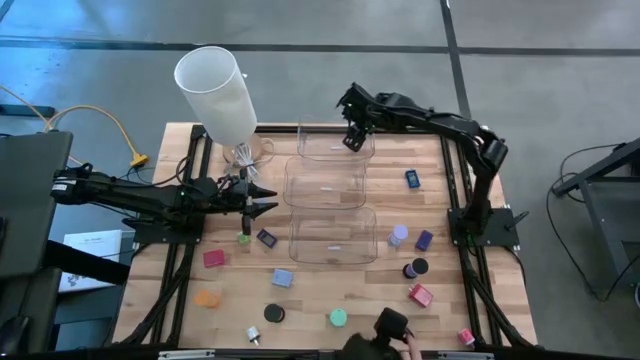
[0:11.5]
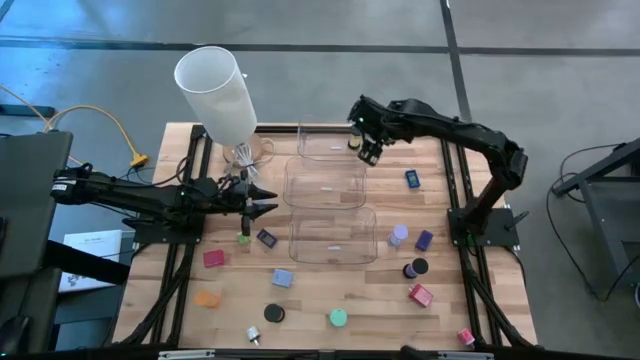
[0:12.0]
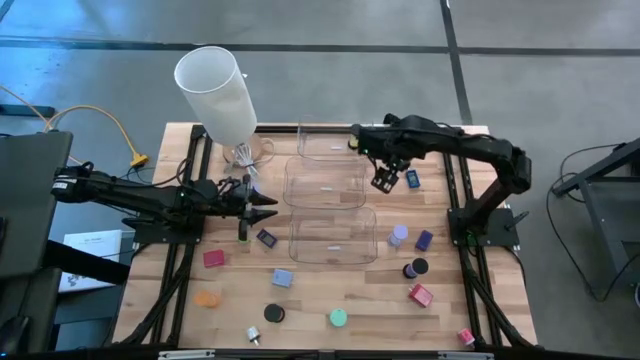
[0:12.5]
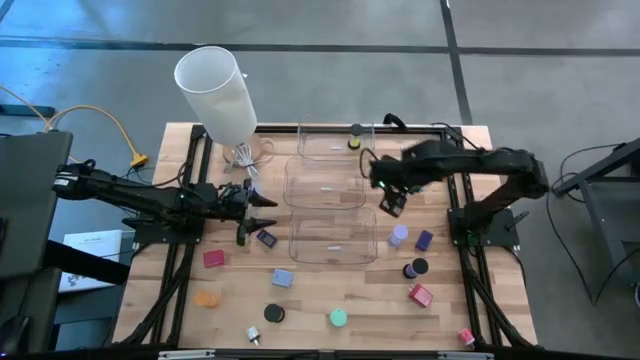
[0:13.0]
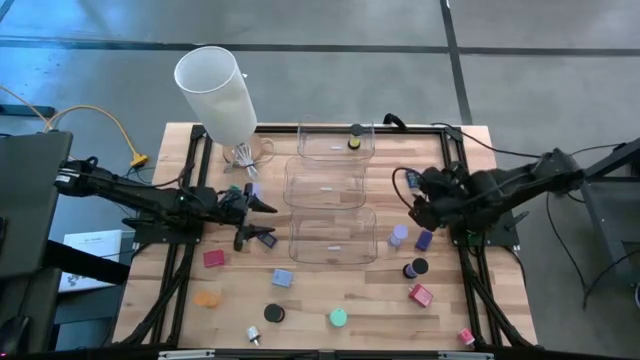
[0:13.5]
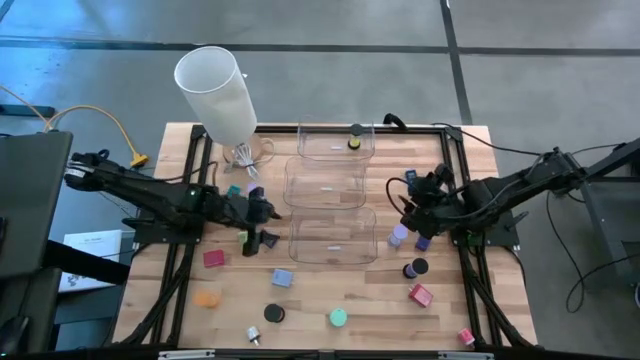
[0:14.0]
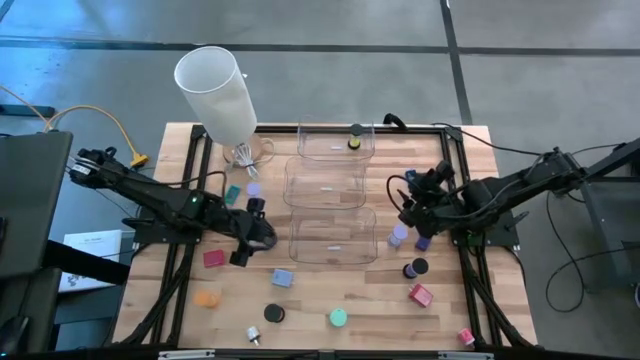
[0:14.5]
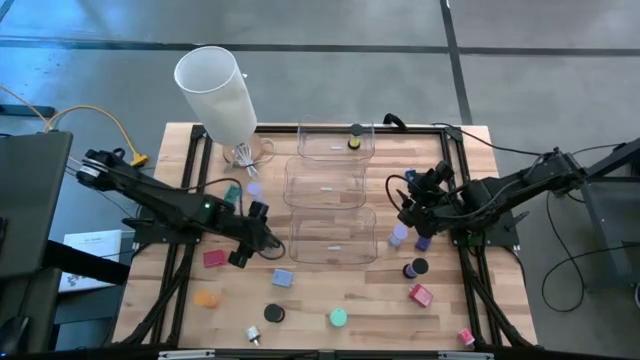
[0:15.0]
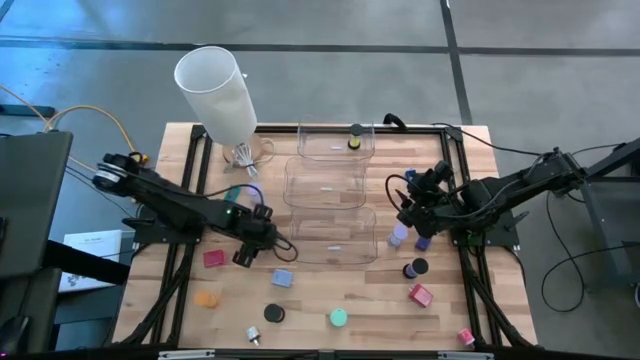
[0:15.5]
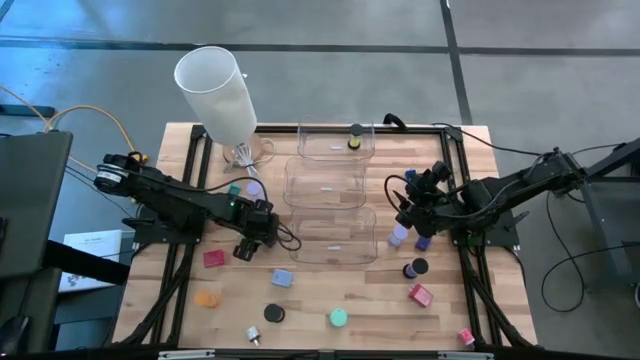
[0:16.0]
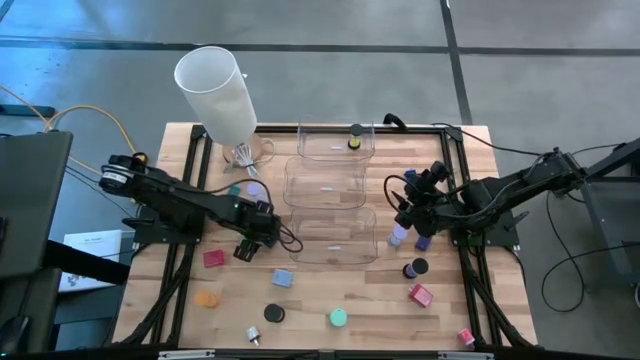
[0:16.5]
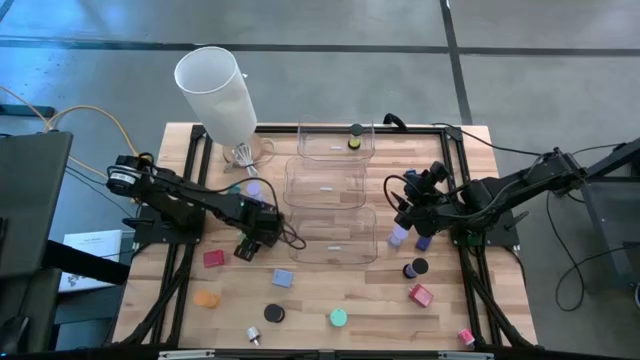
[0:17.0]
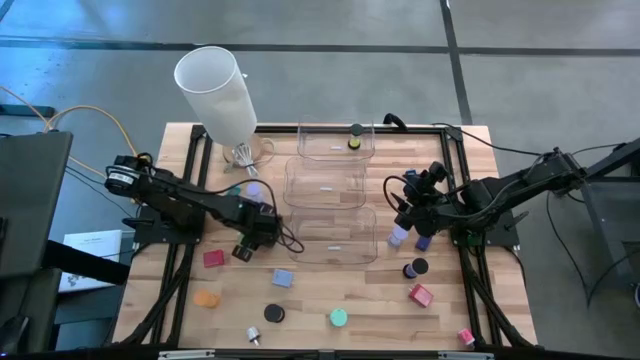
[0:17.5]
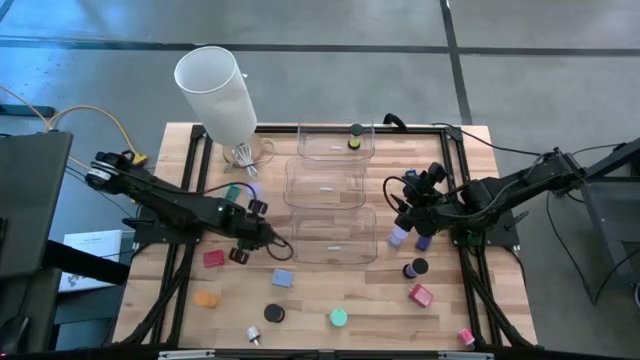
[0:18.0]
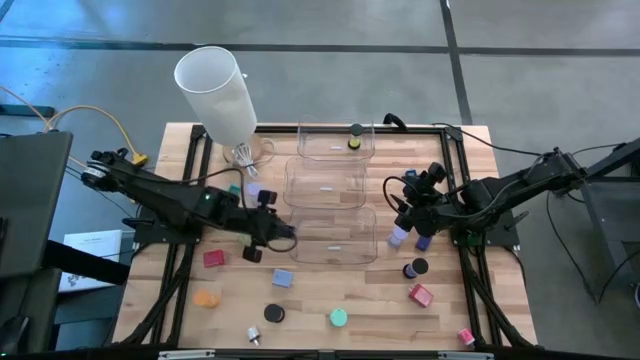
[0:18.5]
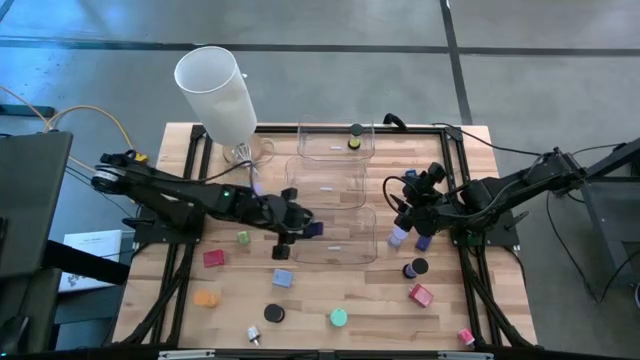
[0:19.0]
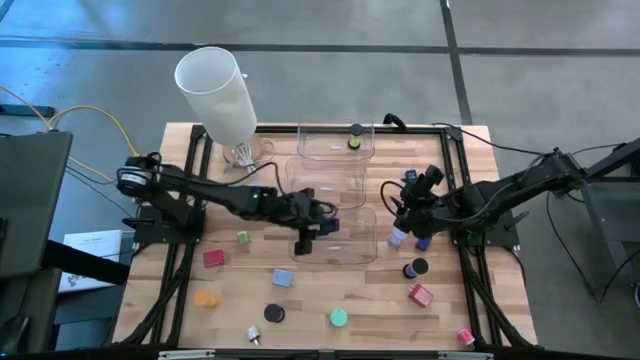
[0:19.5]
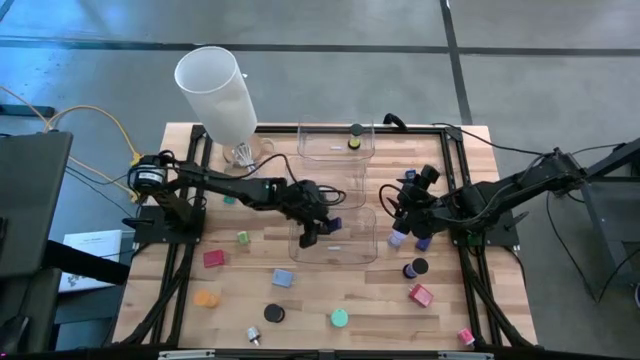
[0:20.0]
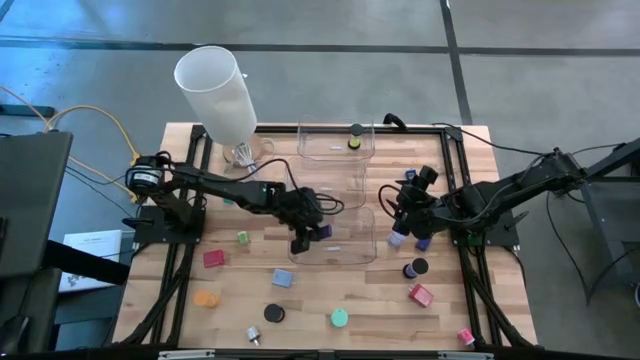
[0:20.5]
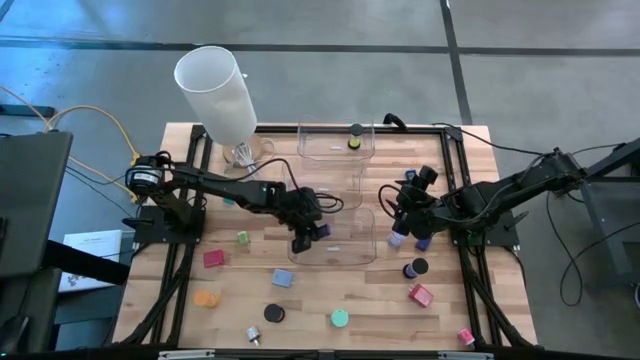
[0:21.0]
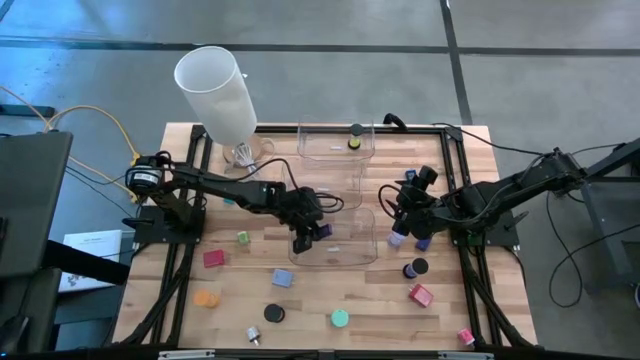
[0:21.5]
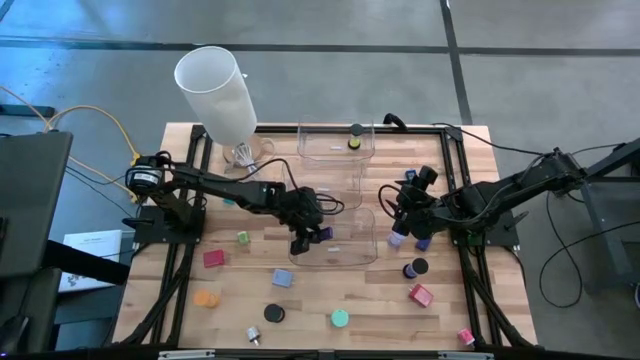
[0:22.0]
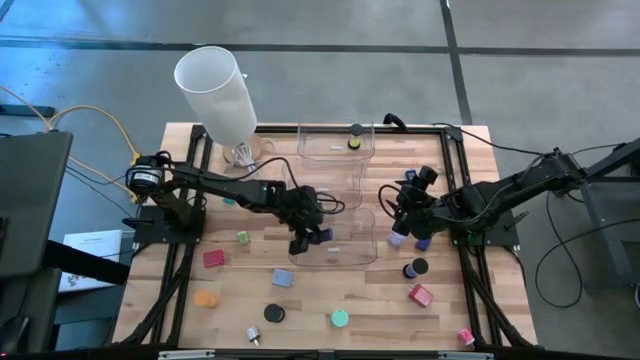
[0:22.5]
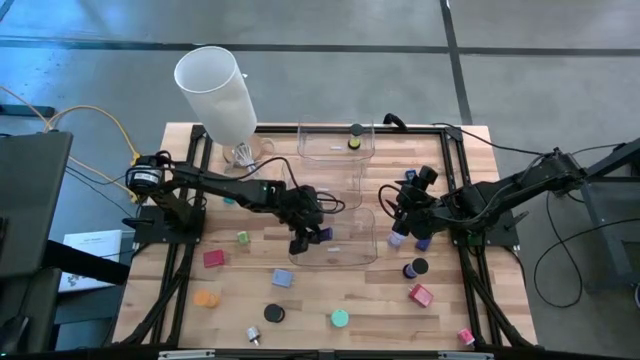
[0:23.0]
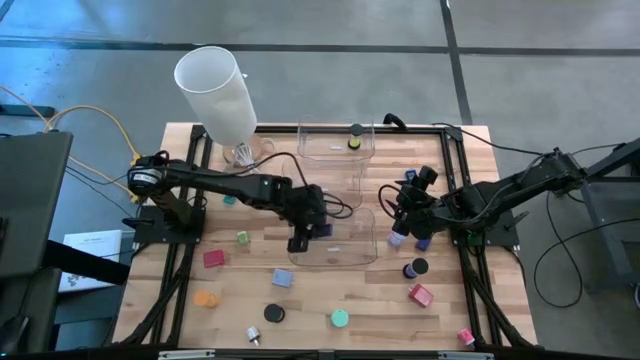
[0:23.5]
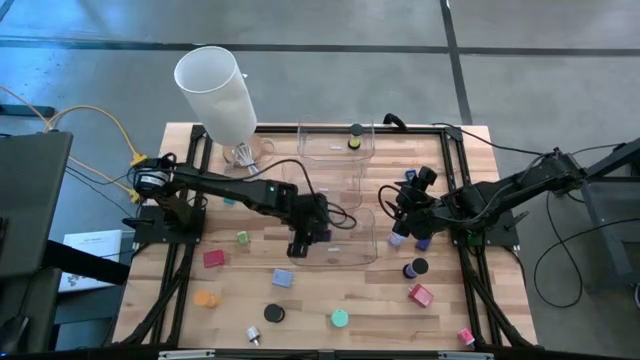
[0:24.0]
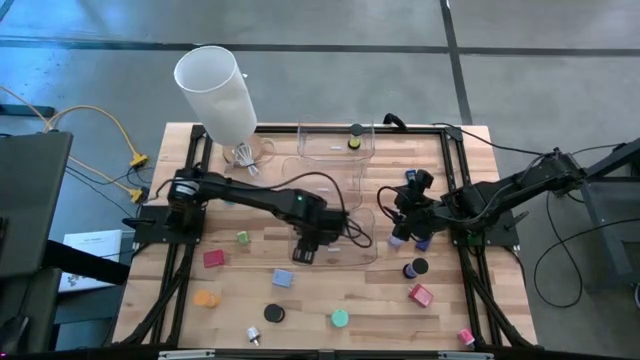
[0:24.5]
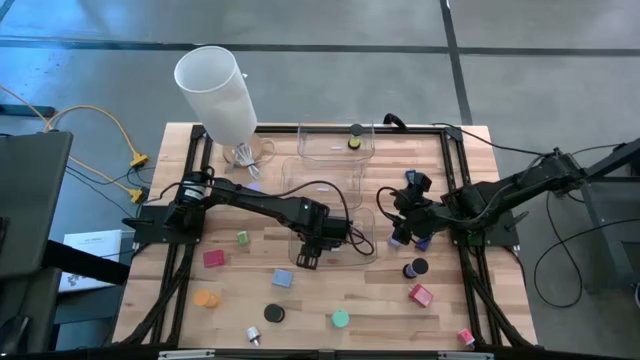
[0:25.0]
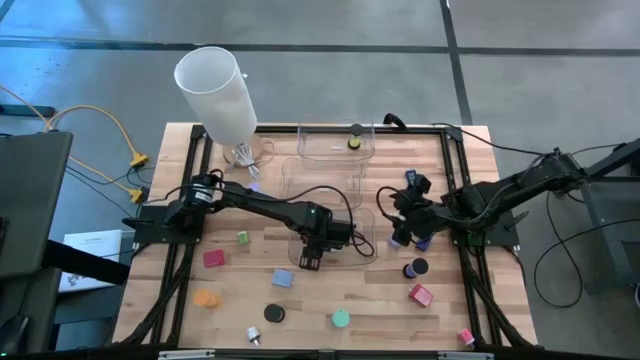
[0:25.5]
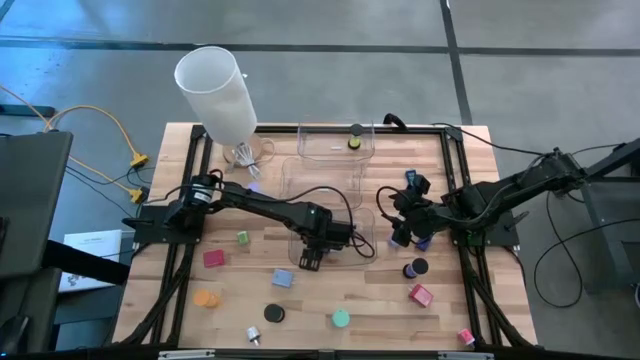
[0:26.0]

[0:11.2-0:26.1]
Task: Pick & Place Office items
Put the left dark blue digital timer into the bottom transparent bin

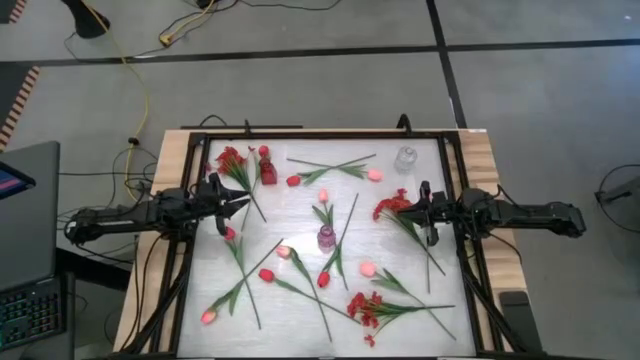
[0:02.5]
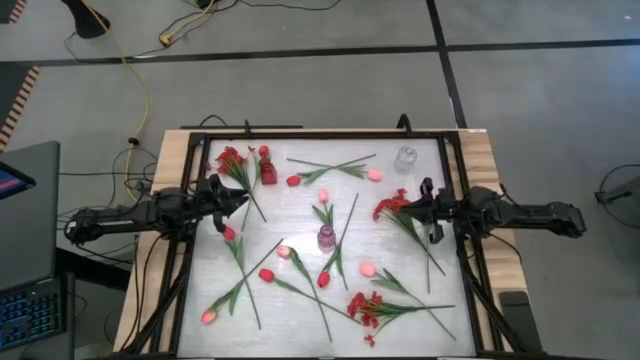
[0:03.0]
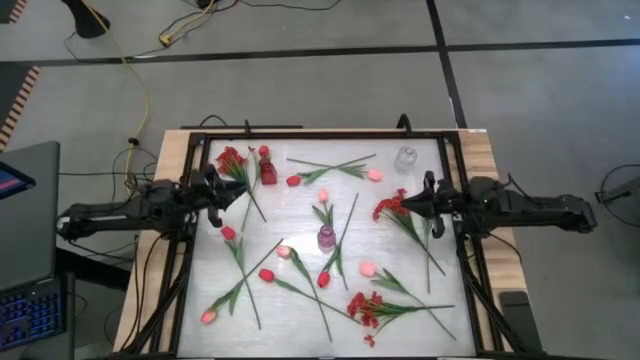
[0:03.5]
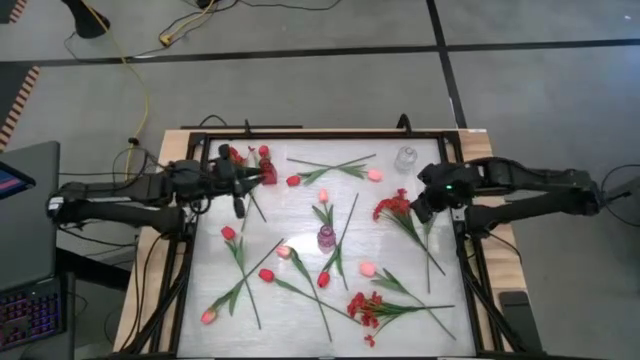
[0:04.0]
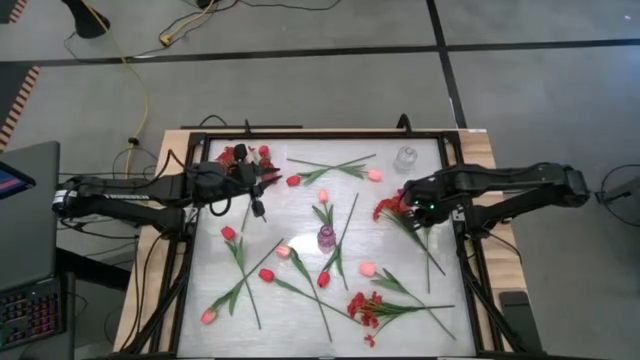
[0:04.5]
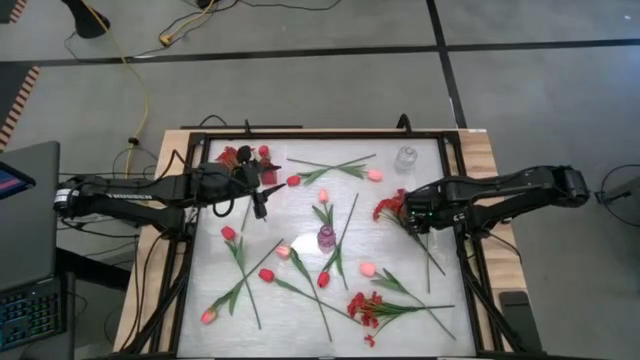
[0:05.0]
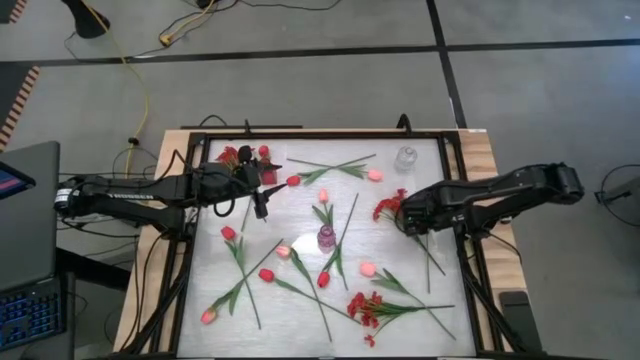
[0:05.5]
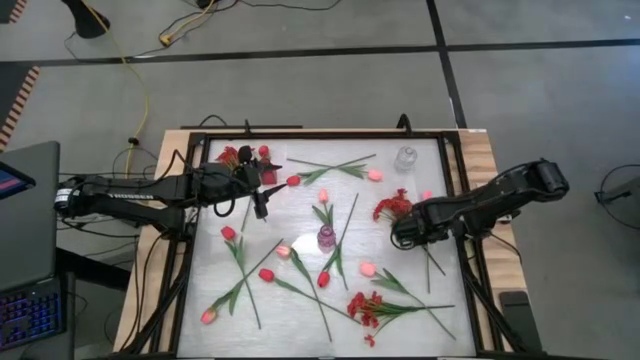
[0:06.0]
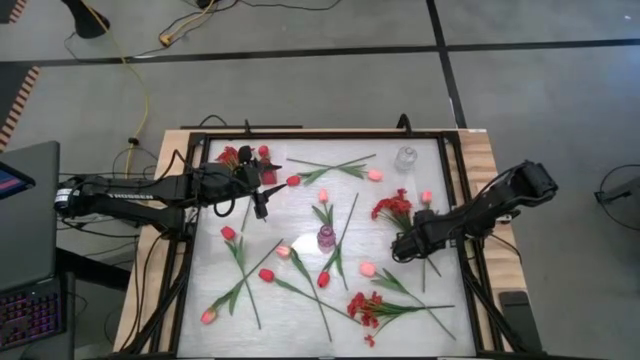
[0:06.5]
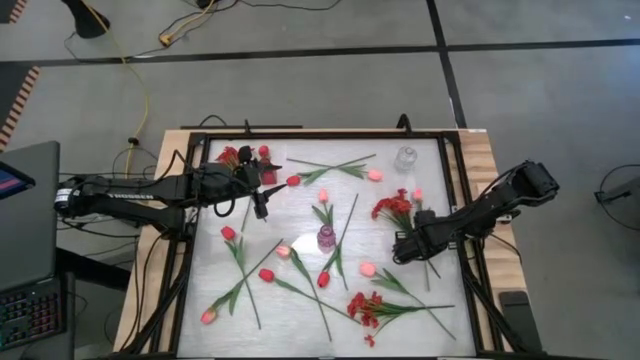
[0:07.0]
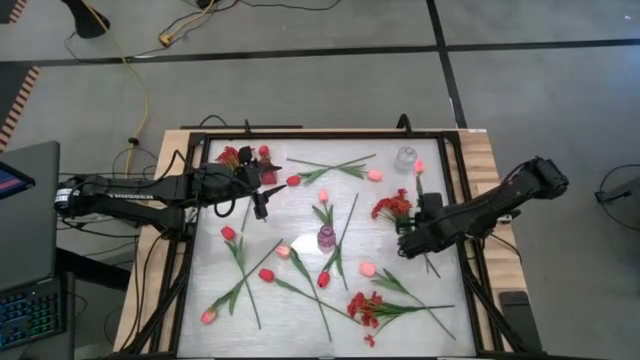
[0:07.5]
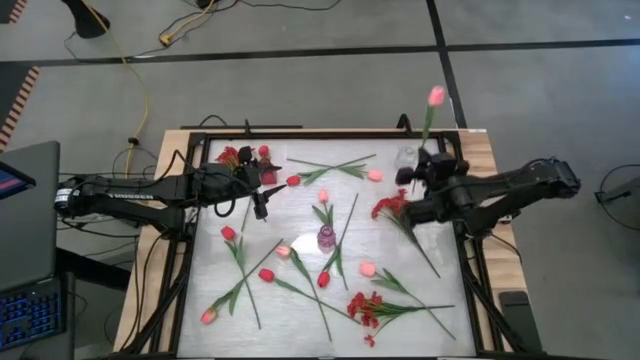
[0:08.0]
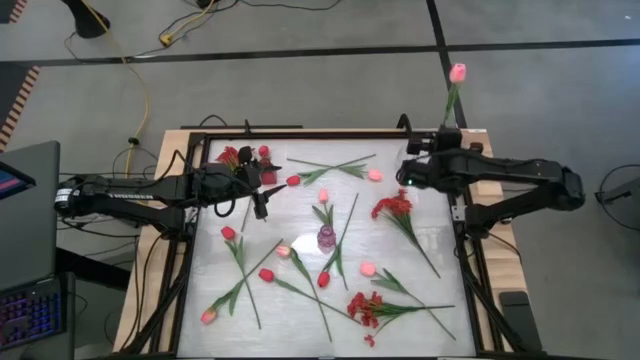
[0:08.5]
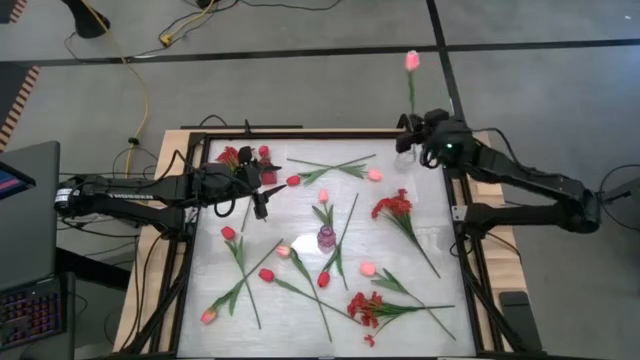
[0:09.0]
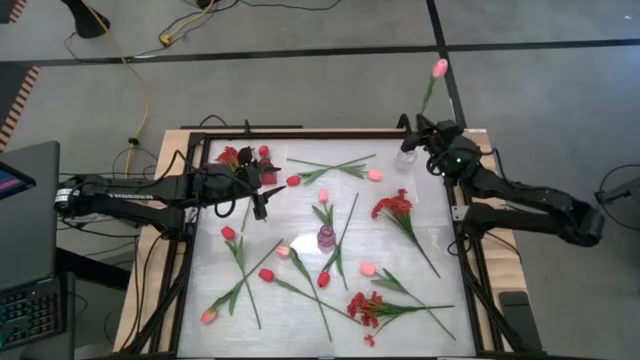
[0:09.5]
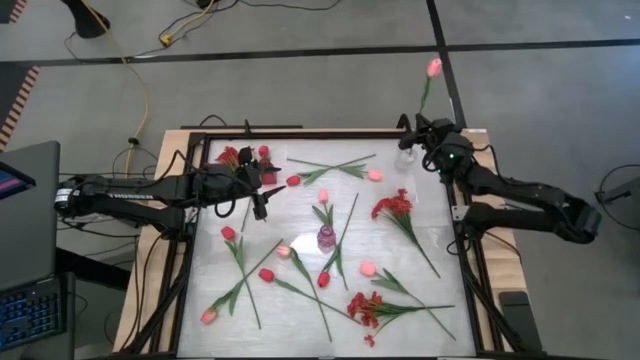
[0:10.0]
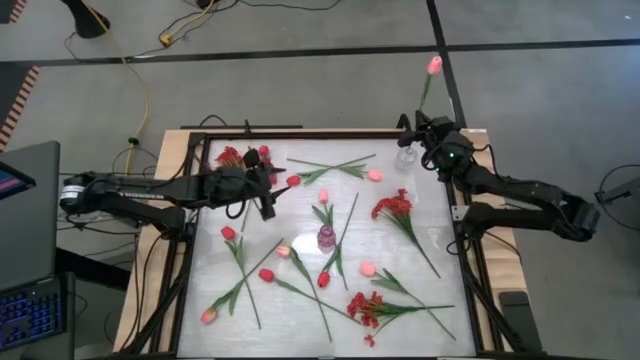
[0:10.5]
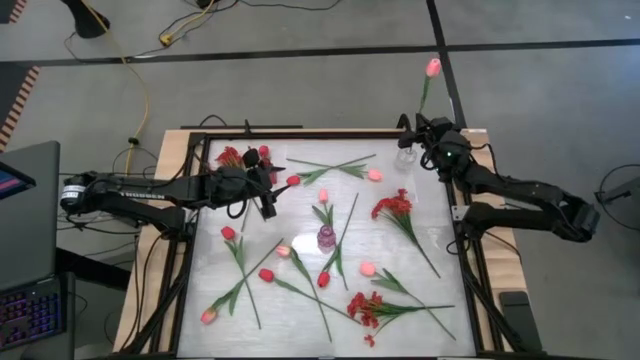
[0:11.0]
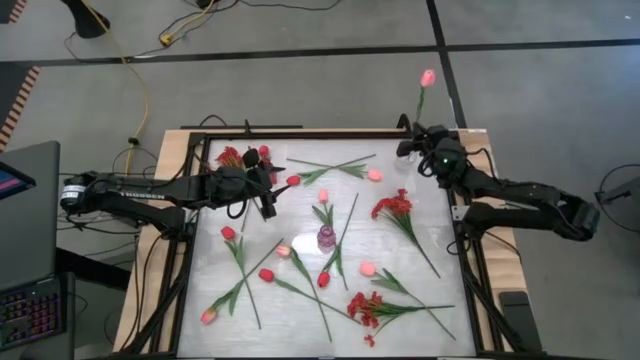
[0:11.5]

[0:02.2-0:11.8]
Task: Sort flowers into vase by color
Put the pink flower into the transparent vase
